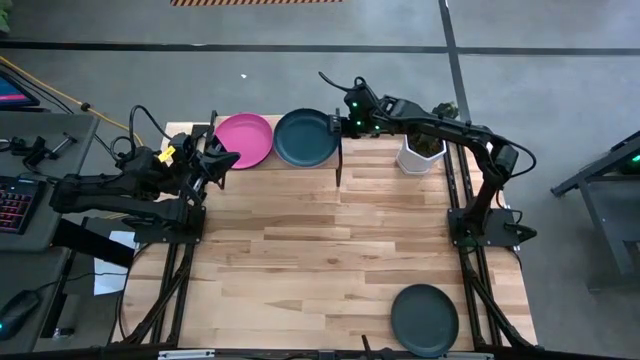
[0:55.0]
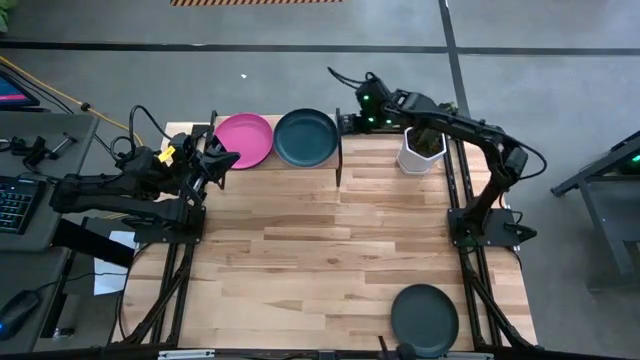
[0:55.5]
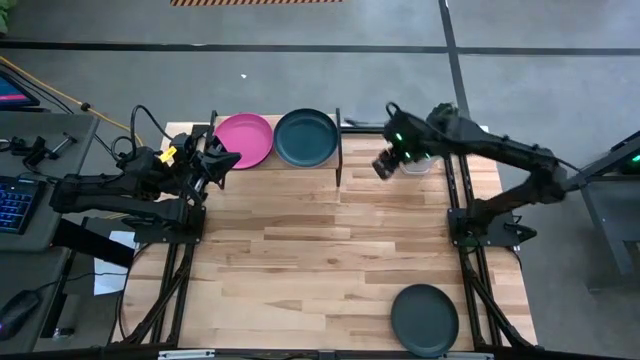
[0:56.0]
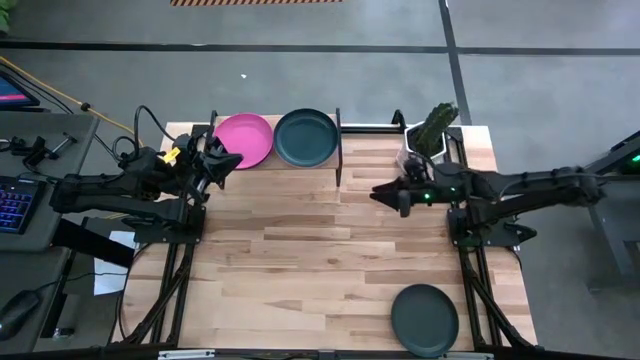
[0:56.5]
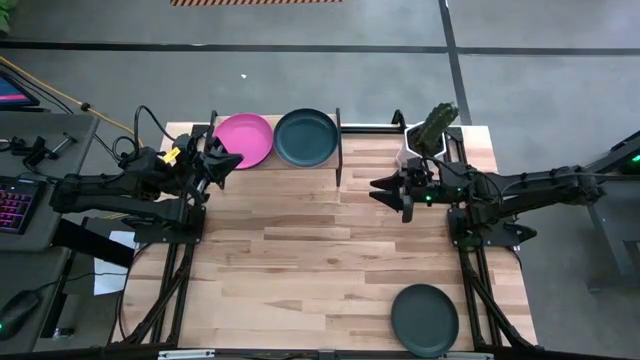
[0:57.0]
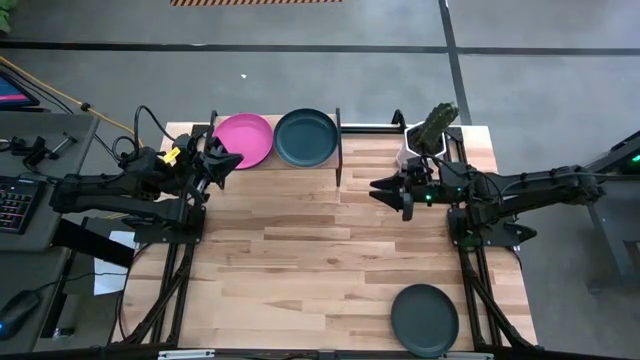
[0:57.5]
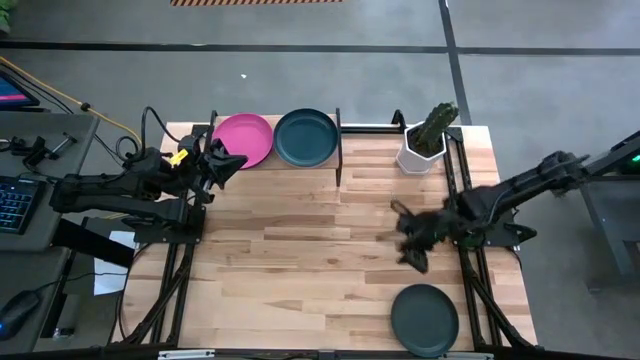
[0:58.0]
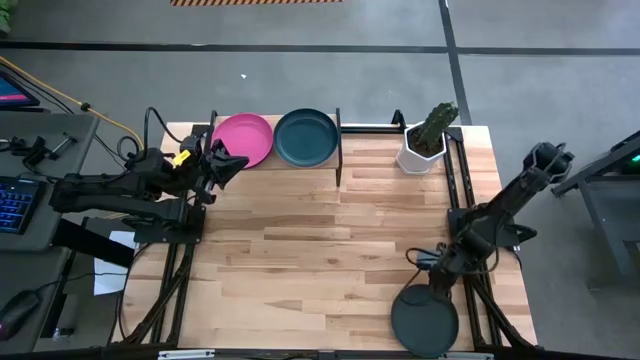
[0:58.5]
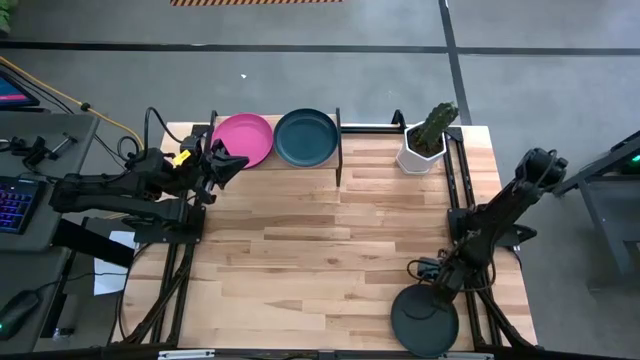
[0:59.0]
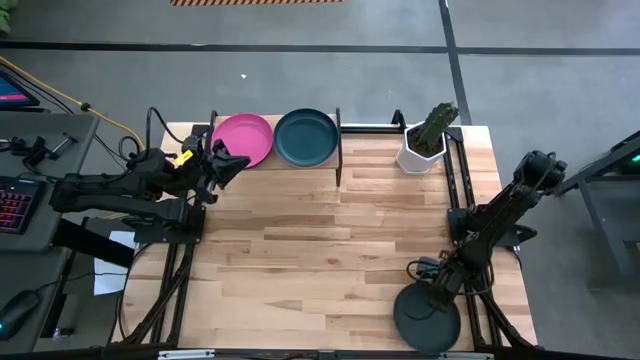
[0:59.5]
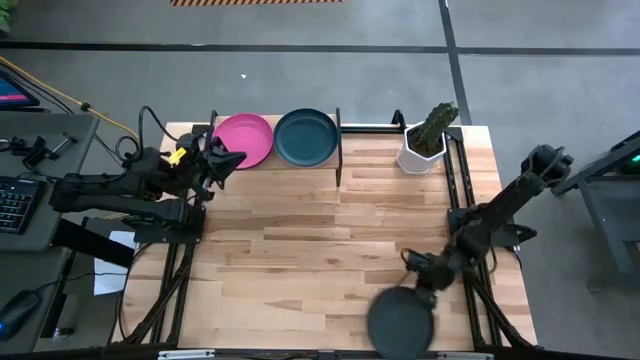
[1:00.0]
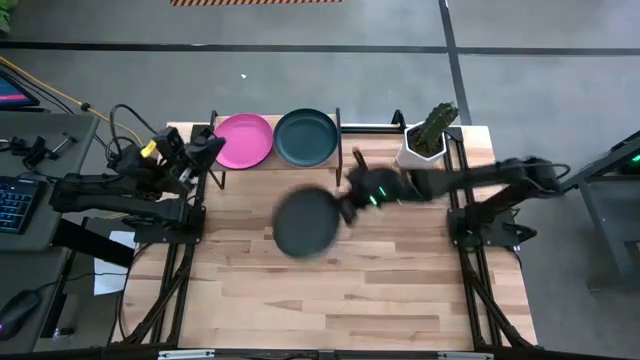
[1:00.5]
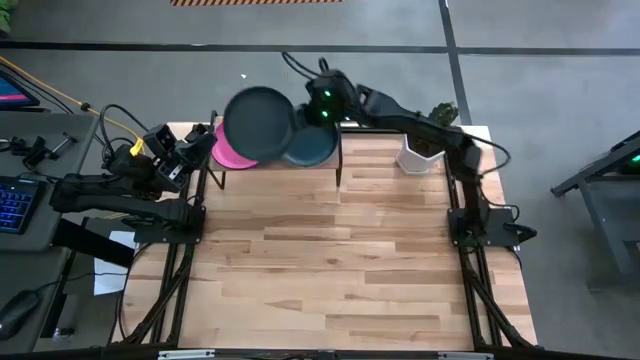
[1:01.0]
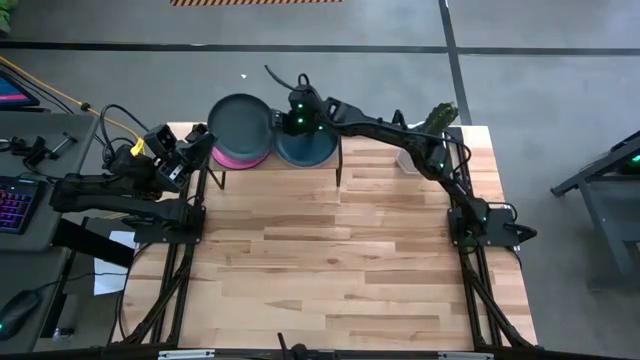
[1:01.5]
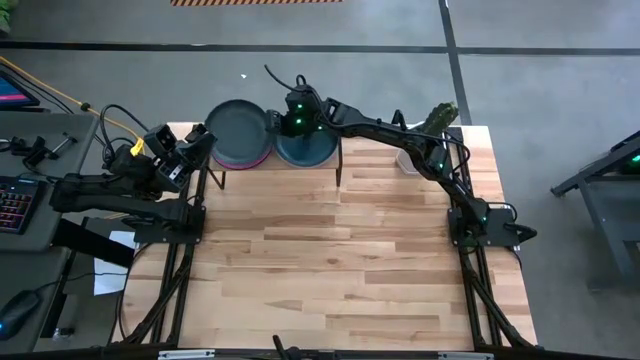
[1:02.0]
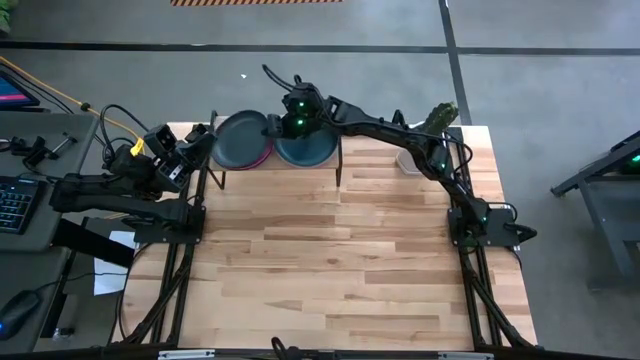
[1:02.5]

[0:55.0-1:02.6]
Task: Place and stack plates onto a shelf
Stack the black plate on the top of the pink plate on the shelf

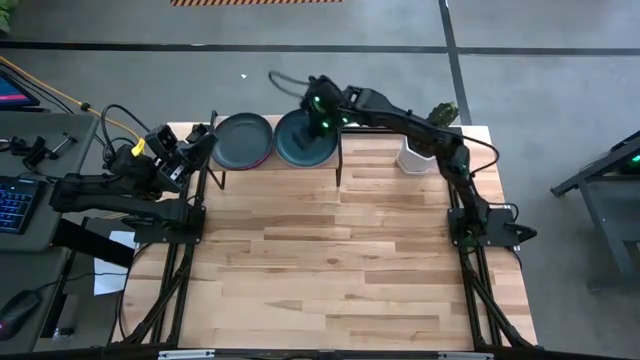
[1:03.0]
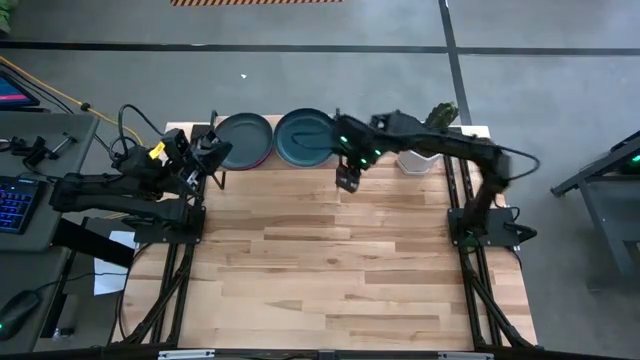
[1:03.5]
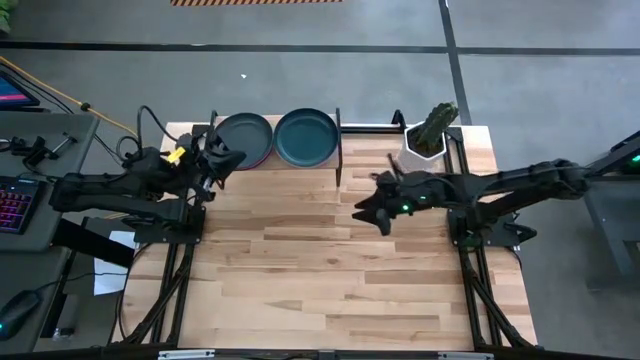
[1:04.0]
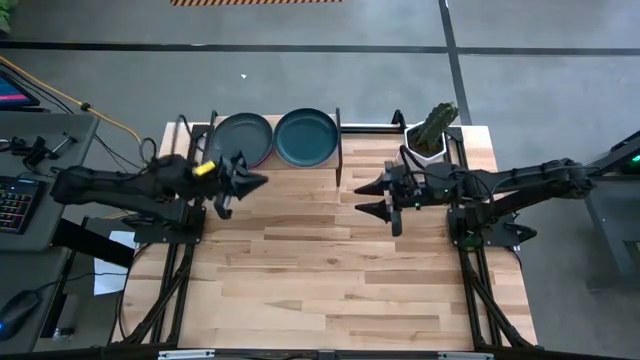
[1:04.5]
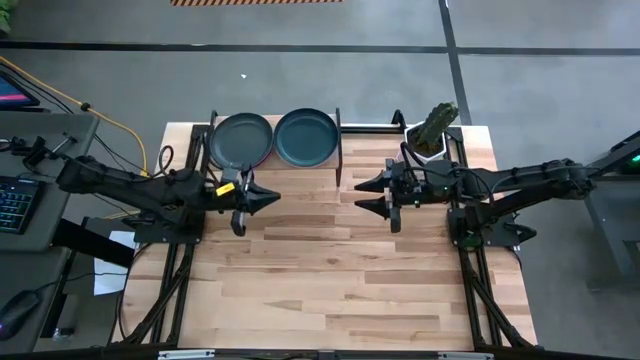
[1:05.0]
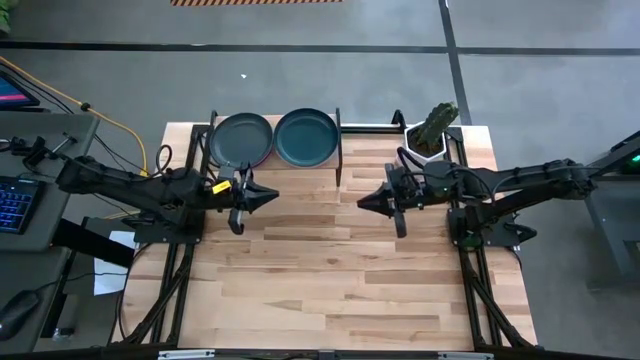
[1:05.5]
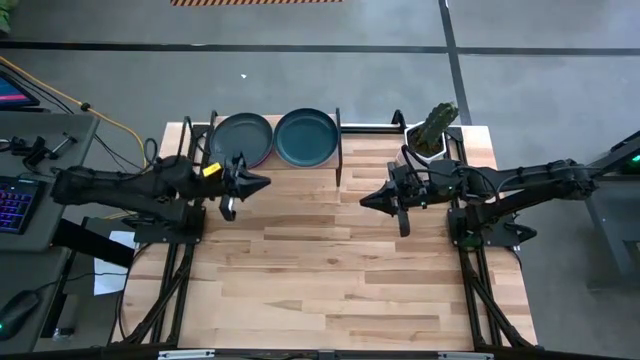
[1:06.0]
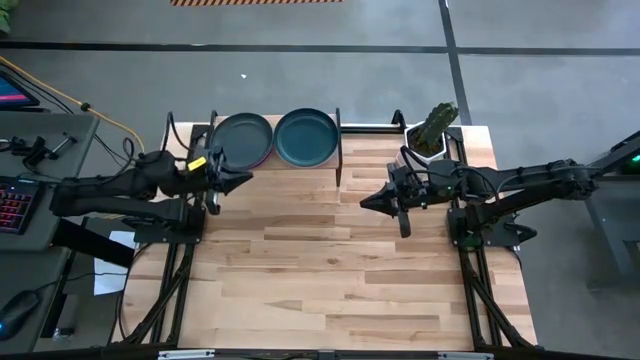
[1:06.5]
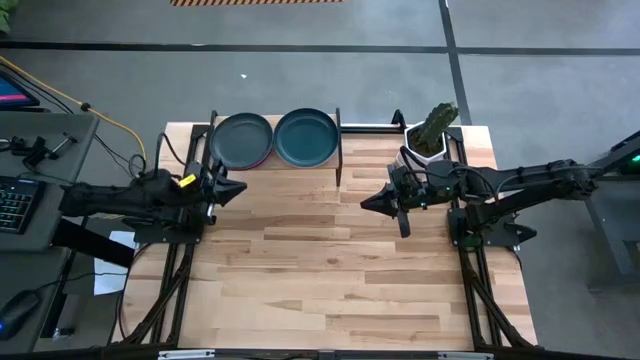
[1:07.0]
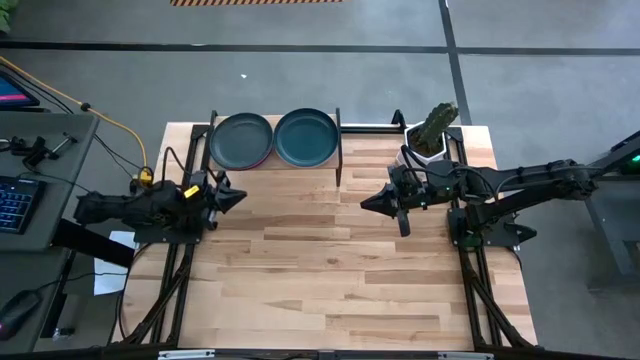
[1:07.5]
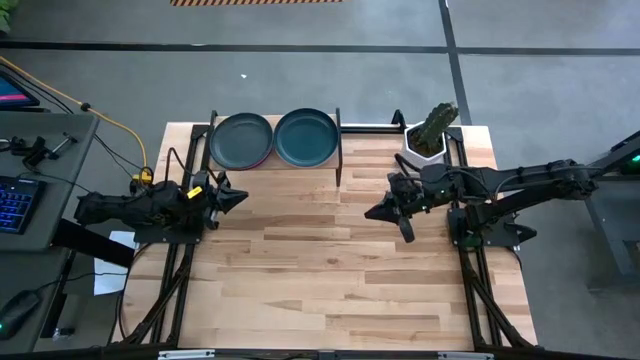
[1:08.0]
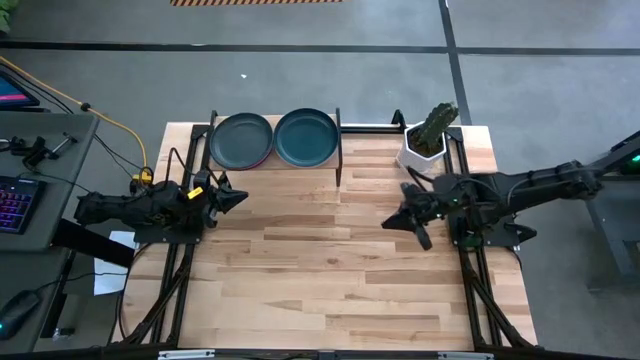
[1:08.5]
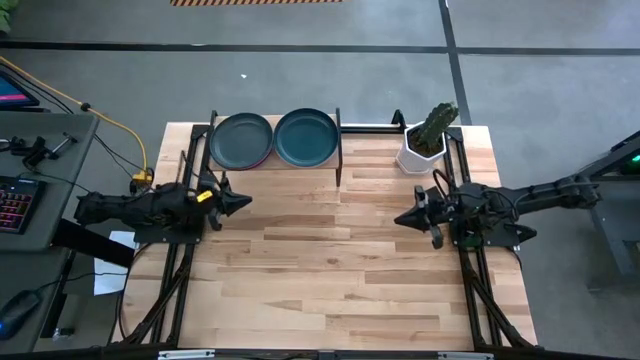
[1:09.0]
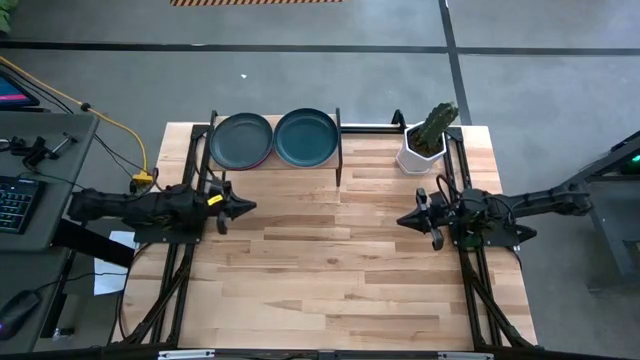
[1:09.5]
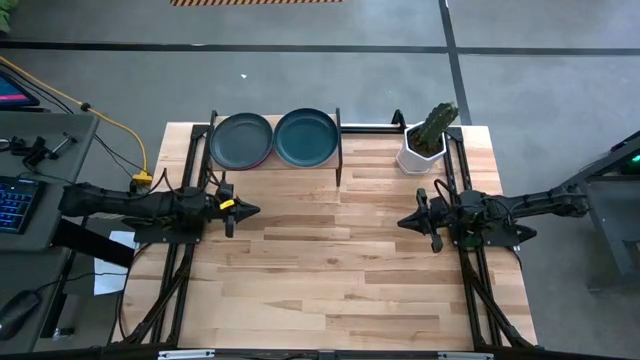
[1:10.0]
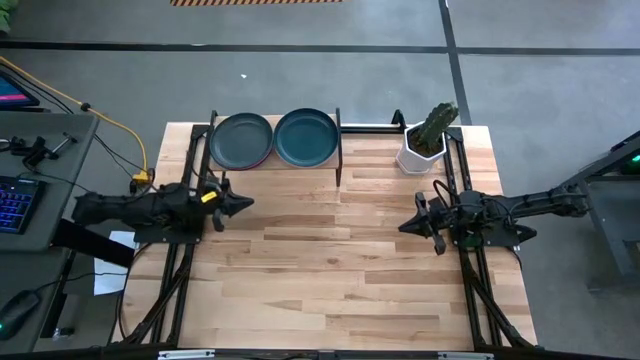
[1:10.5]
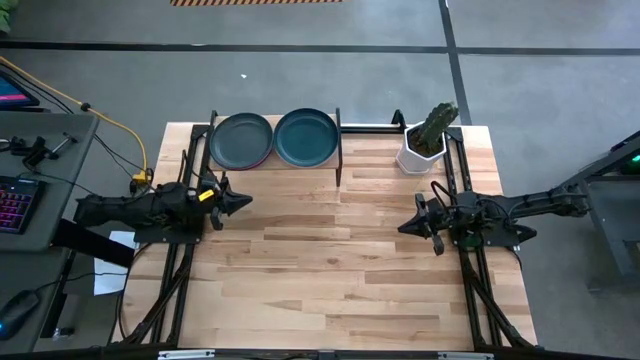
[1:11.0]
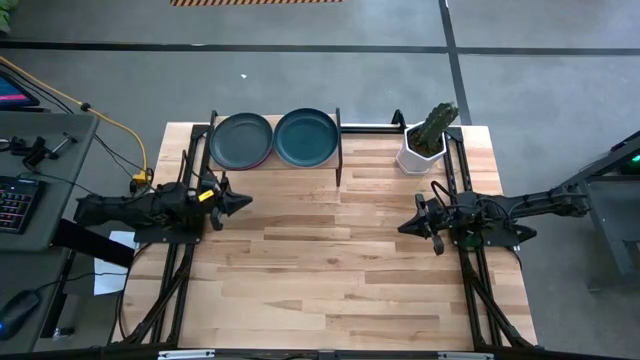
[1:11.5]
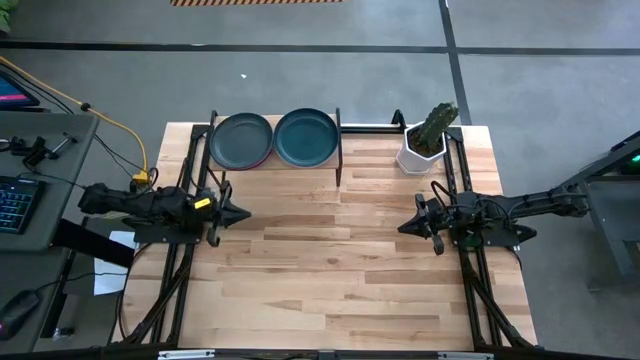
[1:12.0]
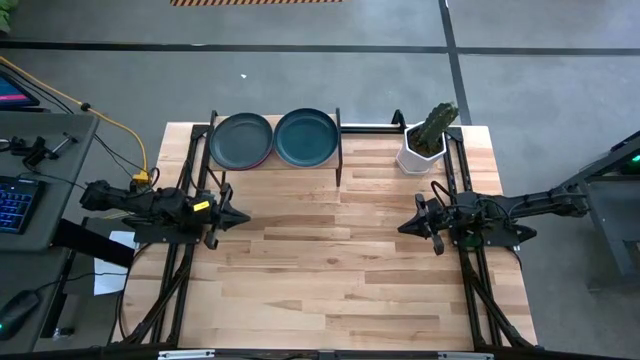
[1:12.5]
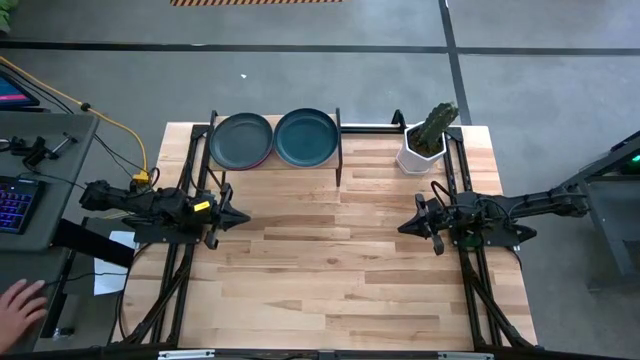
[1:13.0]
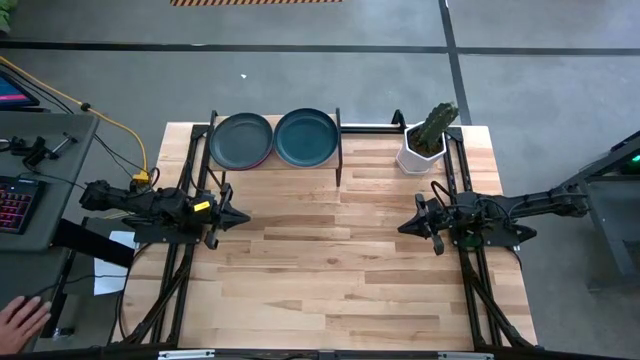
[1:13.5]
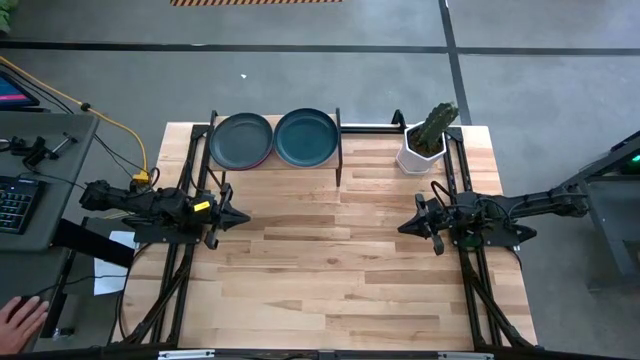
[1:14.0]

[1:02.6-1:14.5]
Return to Home Position

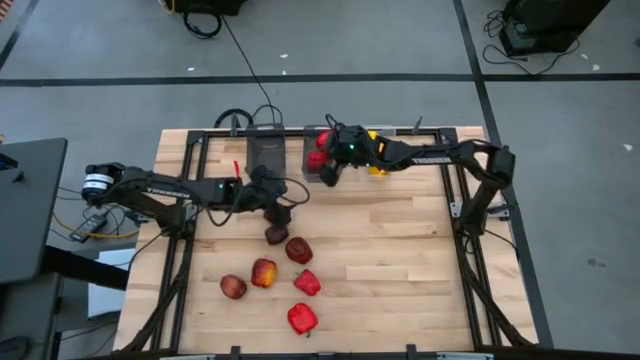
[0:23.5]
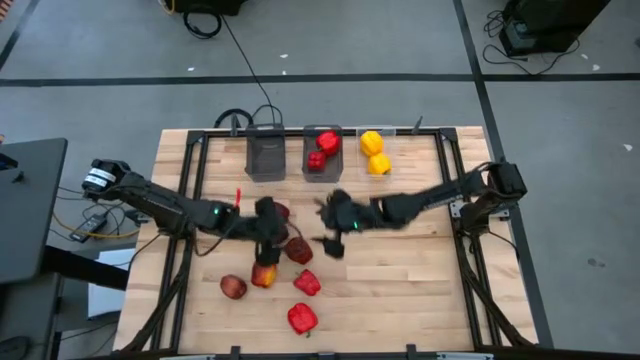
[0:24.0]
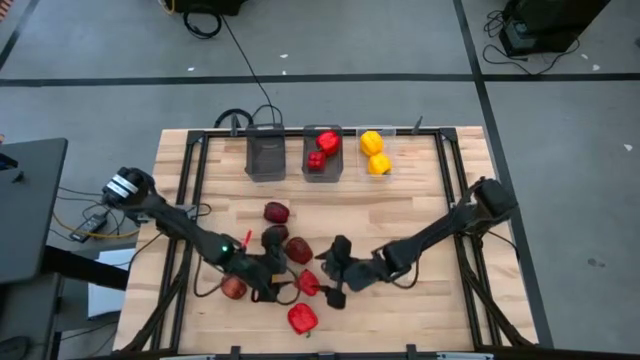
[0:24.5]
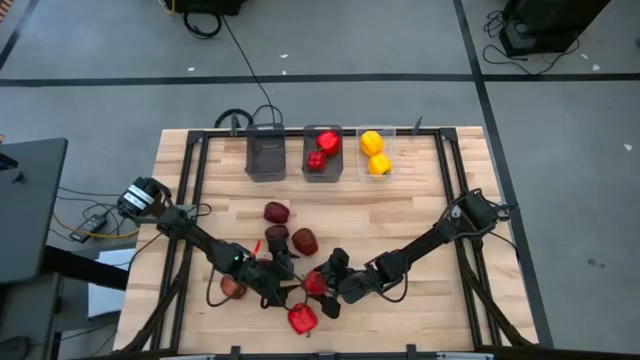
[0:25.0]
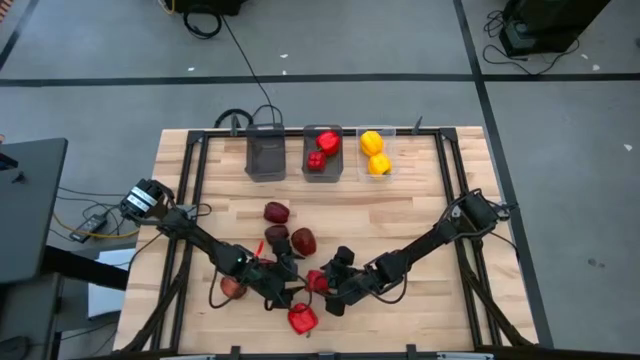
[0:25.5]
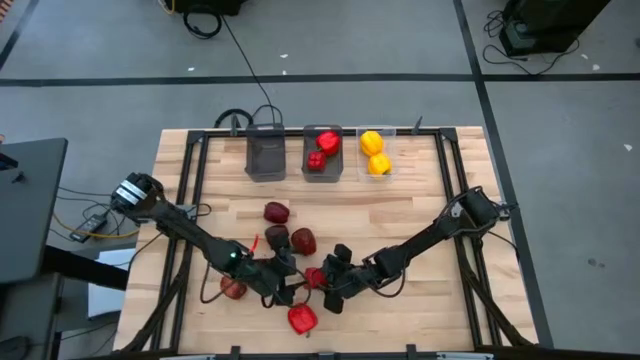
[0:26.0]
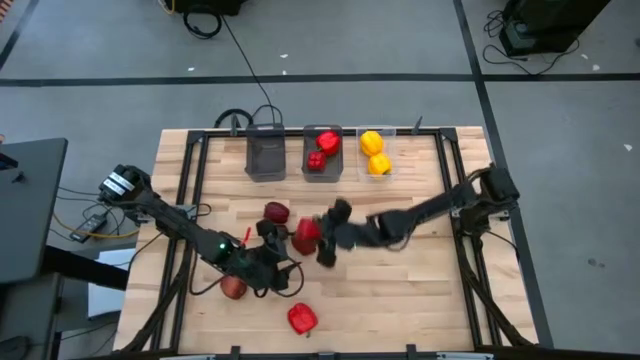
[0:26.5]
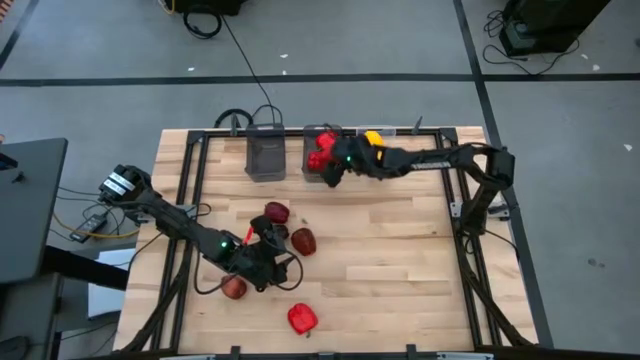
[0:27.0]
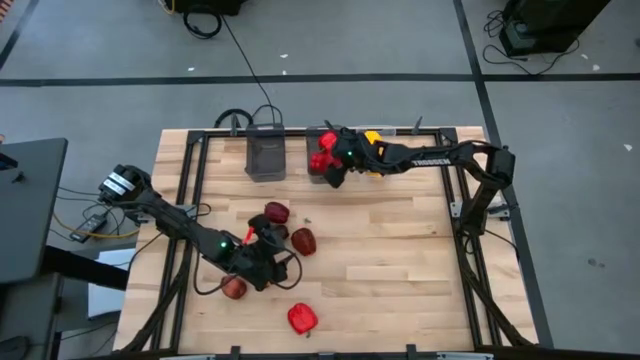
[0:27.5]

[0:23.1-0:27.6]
Task: Sort produce into baskets
Put the red bell pepper into the right black bin
